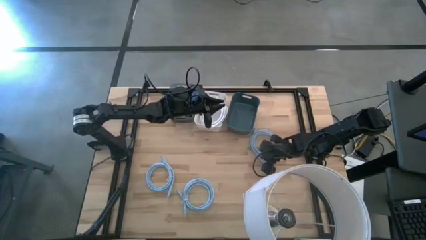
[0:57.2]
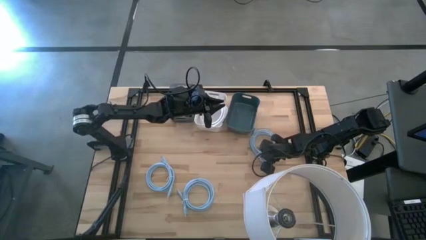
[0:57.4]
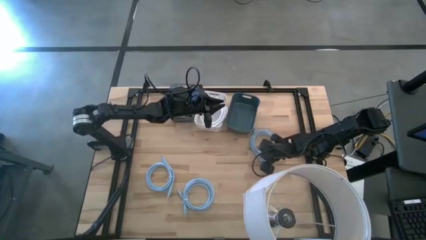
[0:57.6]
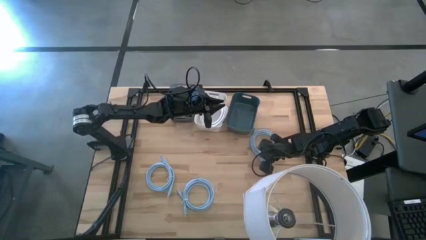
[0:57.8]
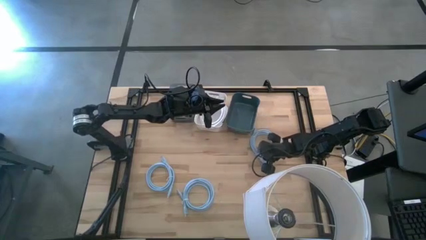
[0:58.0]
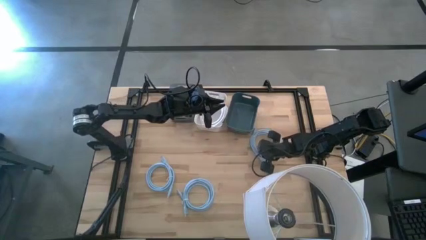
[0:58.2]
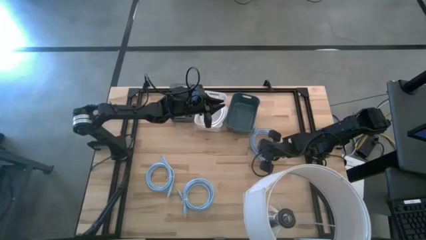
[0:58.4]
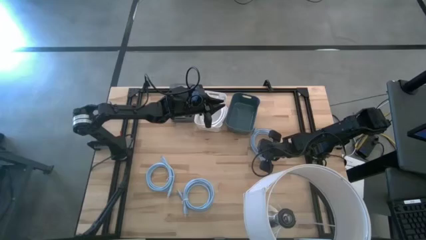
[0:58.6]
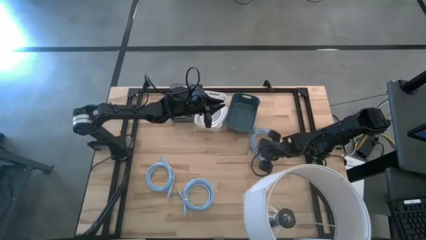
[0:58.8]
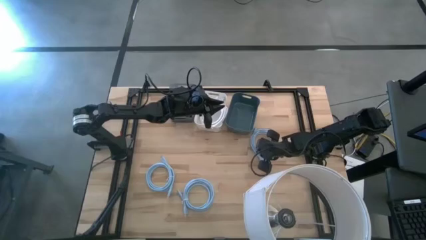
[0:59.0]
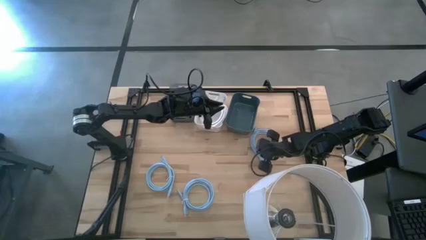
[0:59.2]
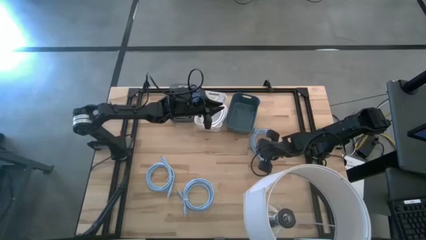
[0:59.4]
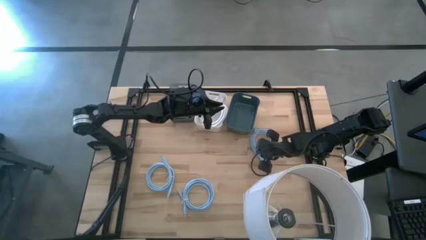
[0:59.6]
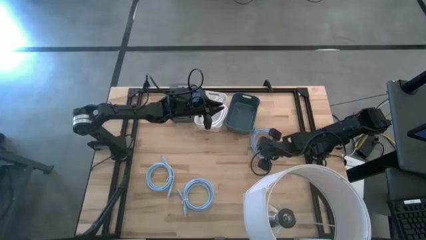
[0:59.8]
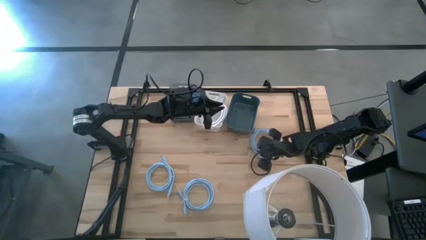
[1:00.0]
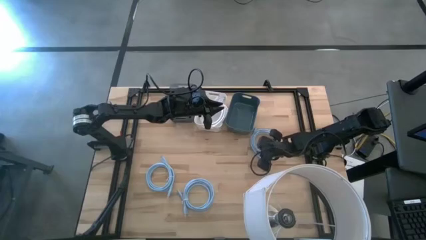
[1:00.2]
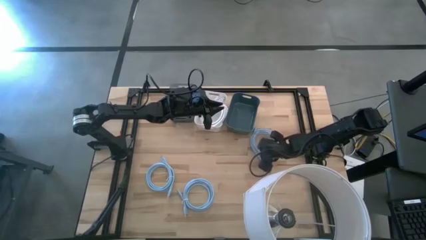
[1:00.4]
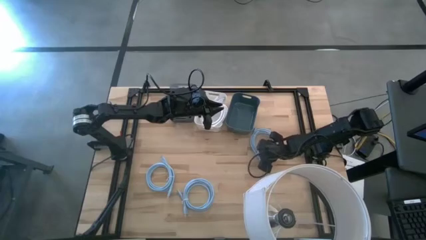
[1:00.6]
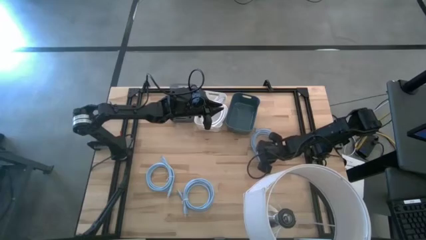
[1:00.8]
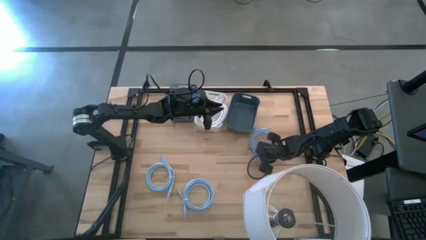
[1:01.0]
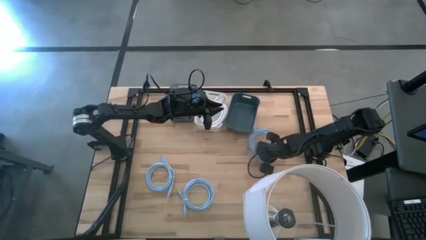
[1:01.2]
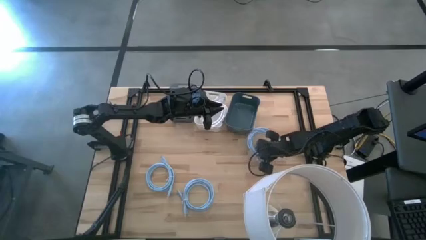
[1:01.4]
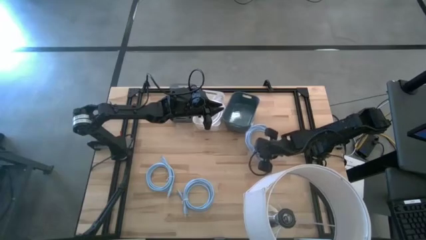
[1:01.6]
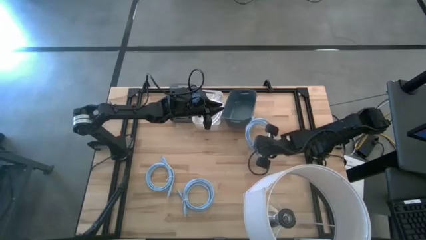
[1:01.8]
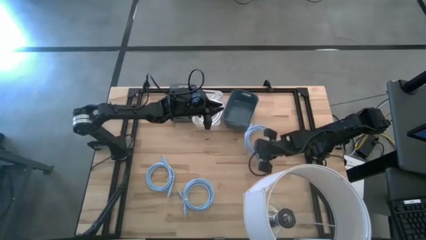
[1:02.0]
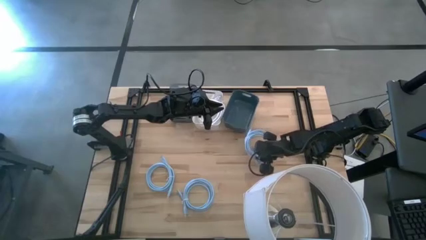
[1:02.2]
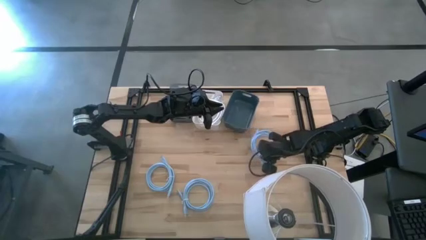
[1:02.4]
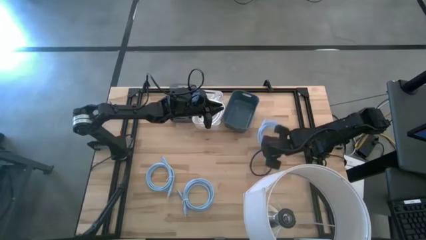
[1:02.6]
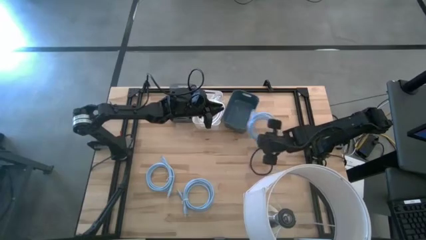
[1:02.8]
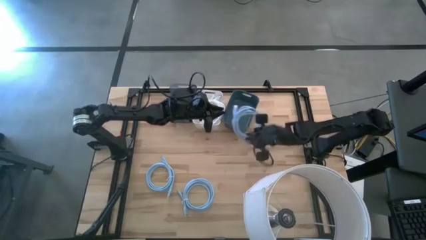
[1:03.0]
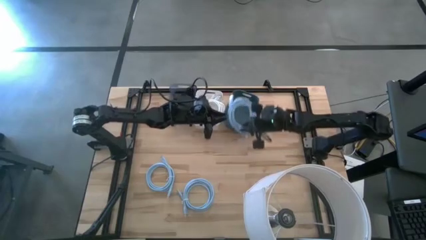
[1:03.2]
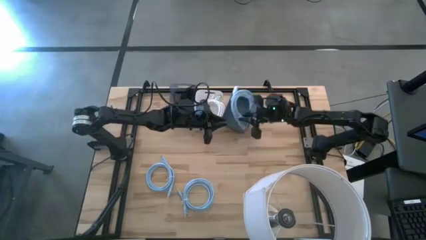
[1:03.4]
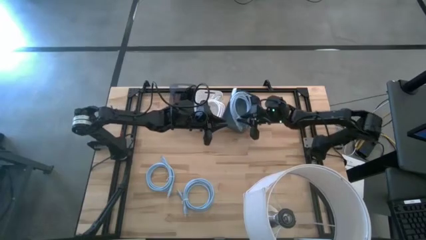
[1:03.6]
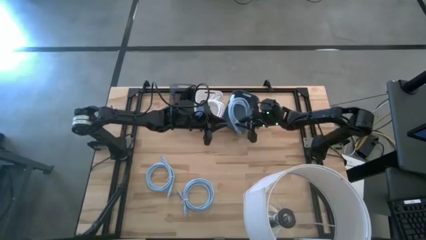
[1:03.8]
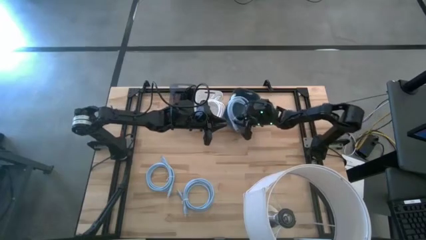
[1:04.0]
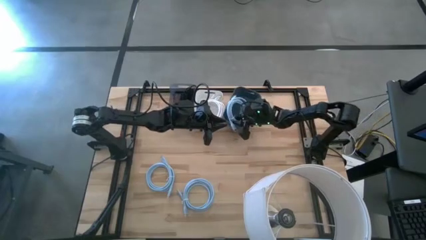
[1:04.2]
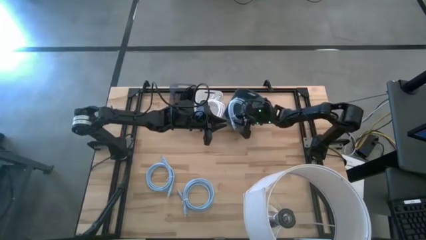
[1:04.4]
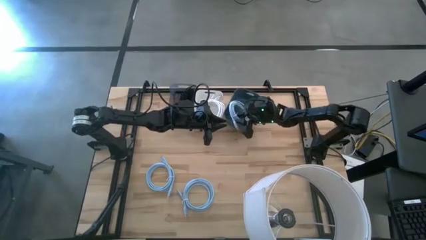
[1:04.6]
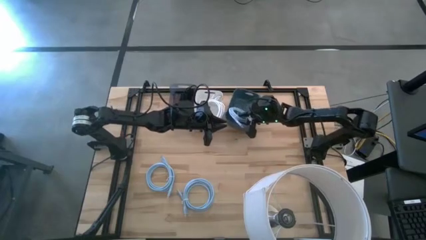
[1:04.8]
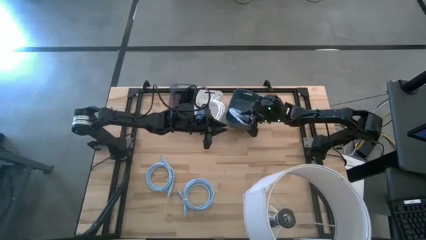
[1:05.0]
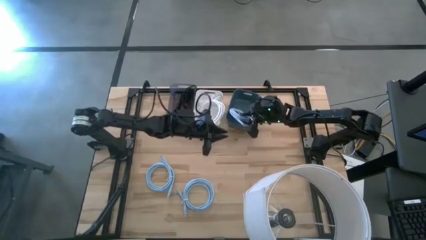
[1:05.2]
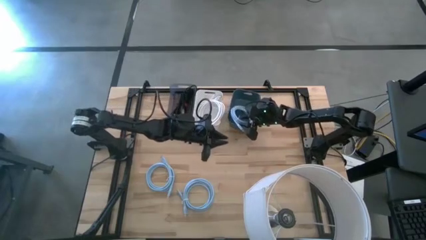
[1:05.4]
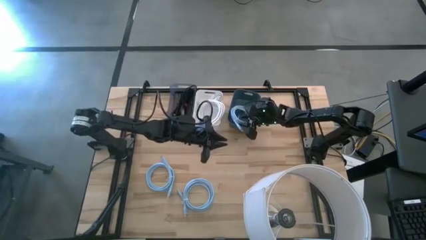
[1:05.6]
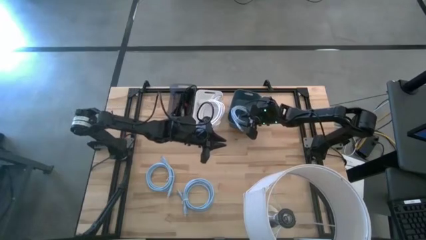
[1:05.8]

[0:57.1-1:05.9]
Task: Pick & Place USB Port
Put the top blue HDMI cable into the blue bin

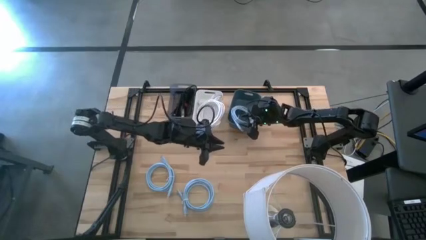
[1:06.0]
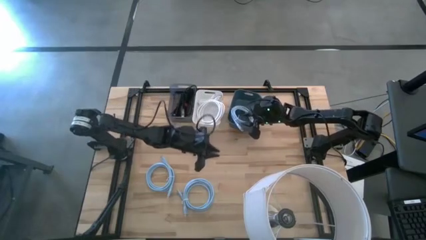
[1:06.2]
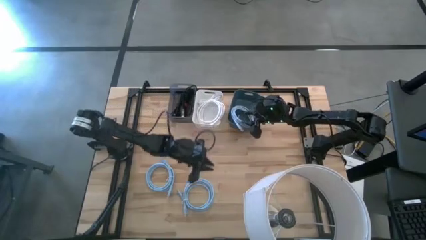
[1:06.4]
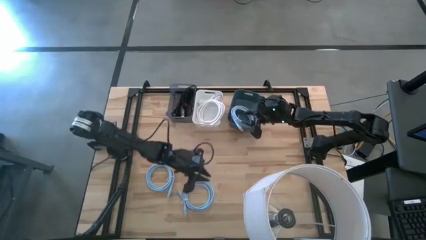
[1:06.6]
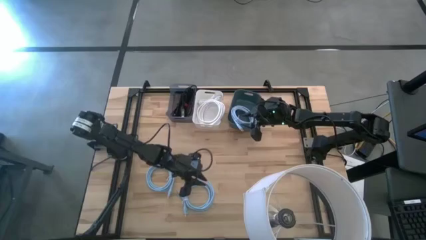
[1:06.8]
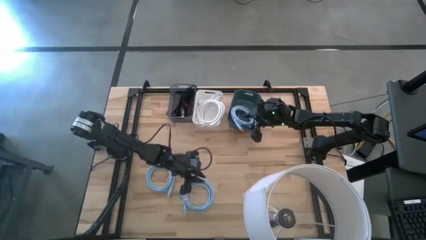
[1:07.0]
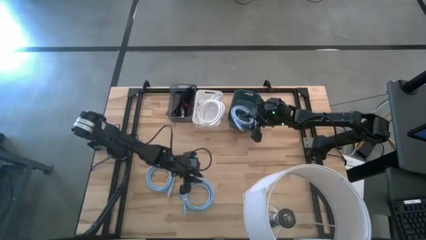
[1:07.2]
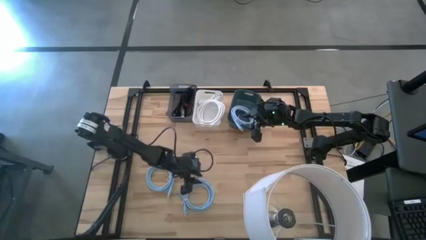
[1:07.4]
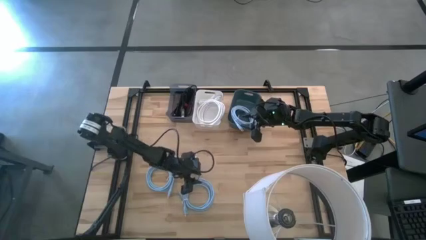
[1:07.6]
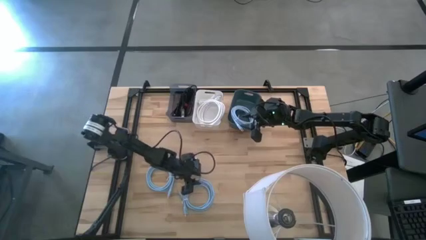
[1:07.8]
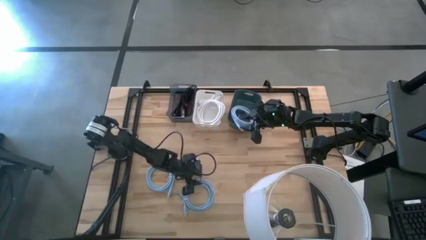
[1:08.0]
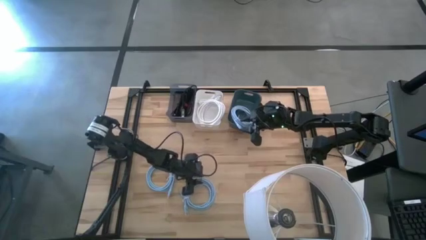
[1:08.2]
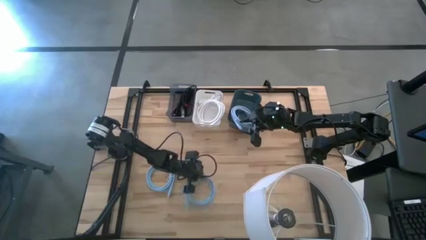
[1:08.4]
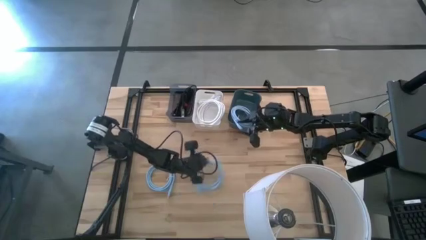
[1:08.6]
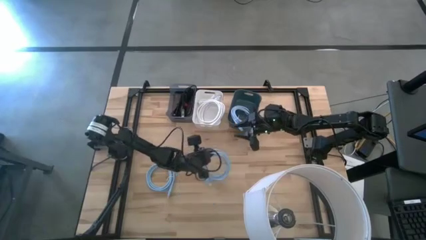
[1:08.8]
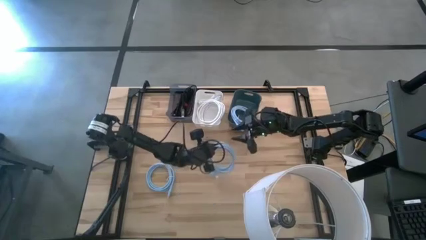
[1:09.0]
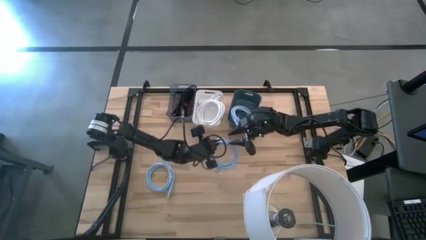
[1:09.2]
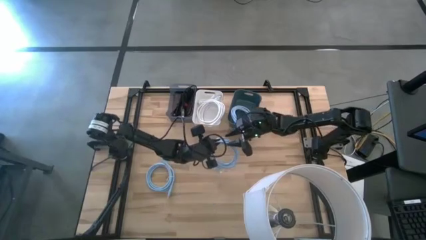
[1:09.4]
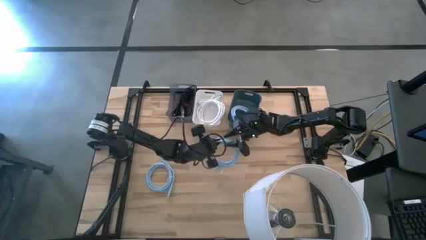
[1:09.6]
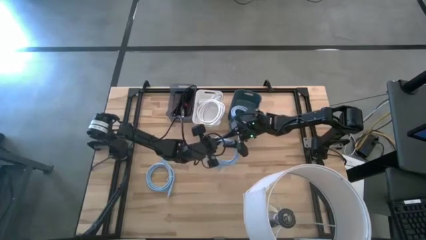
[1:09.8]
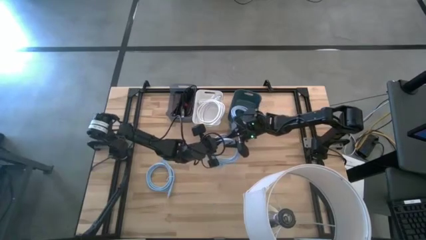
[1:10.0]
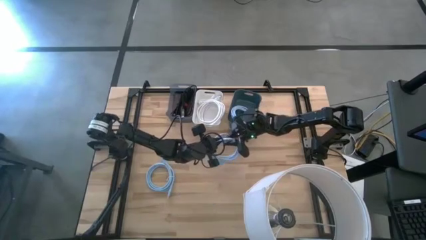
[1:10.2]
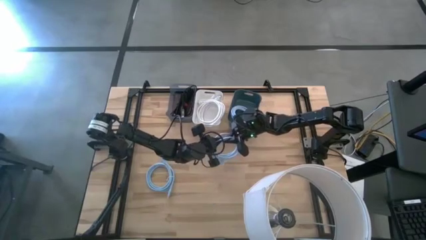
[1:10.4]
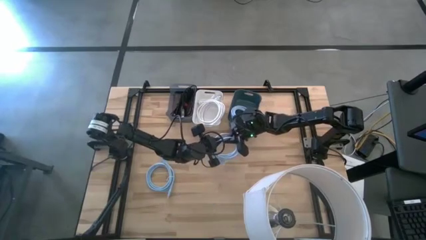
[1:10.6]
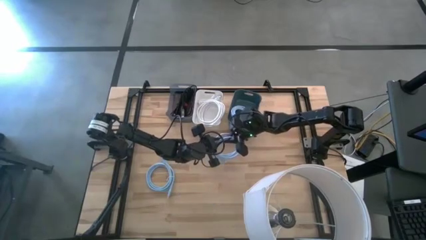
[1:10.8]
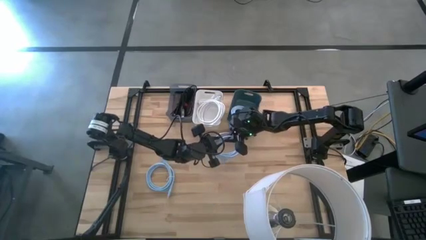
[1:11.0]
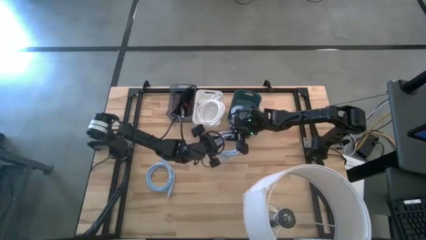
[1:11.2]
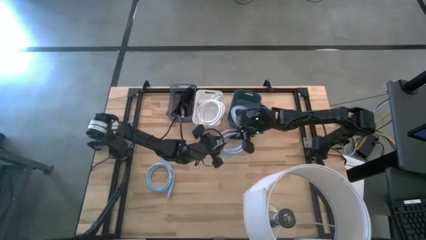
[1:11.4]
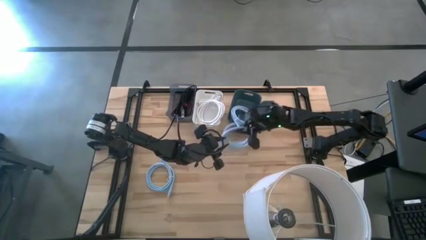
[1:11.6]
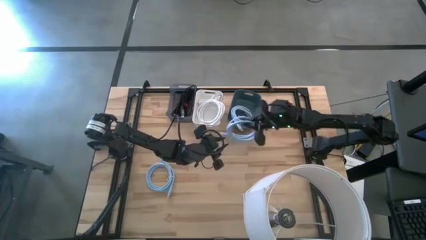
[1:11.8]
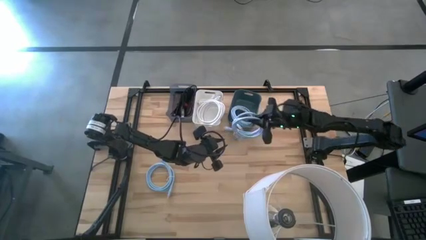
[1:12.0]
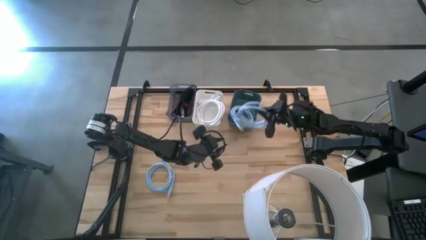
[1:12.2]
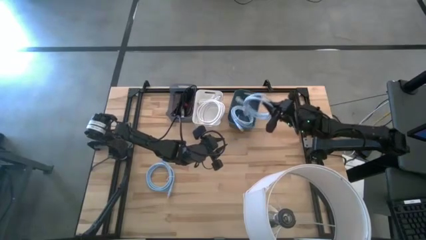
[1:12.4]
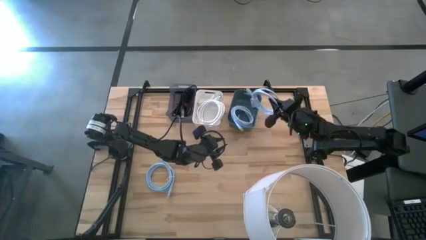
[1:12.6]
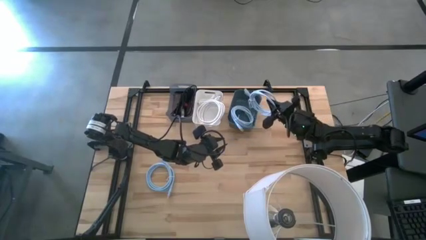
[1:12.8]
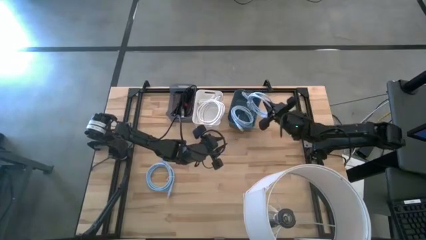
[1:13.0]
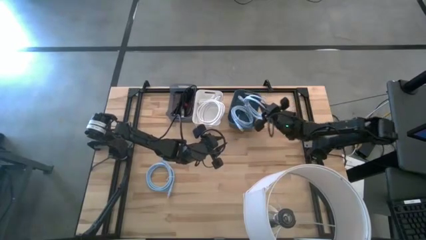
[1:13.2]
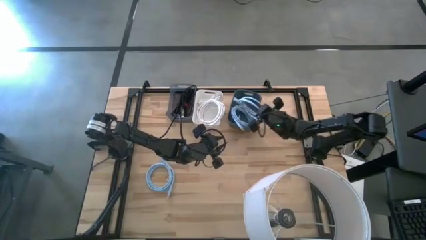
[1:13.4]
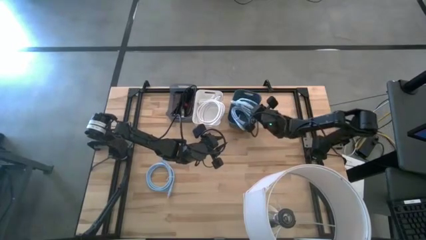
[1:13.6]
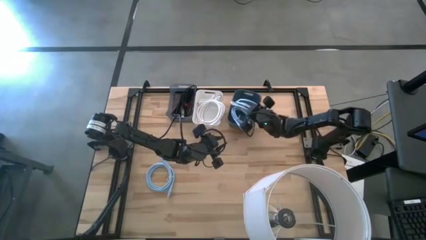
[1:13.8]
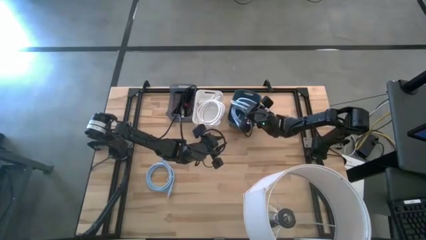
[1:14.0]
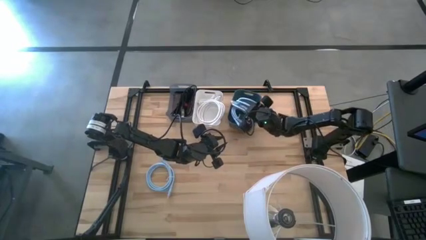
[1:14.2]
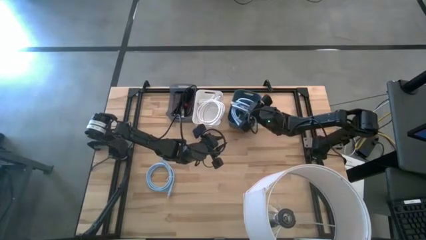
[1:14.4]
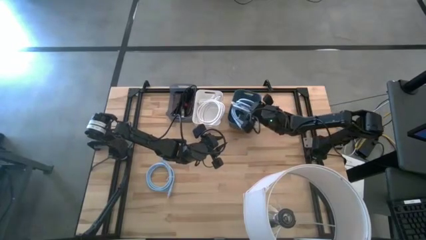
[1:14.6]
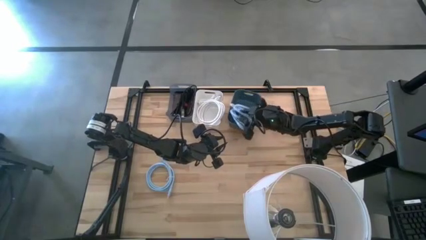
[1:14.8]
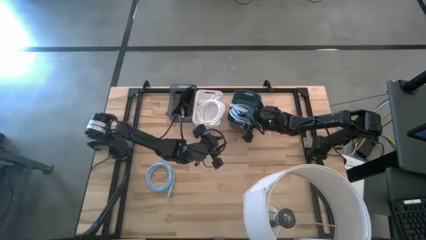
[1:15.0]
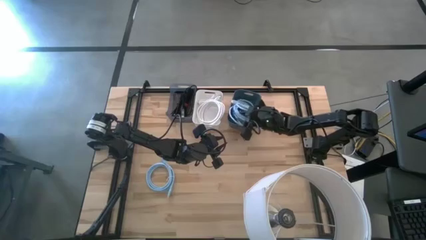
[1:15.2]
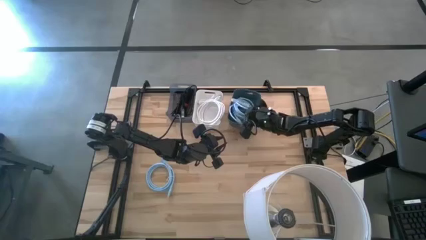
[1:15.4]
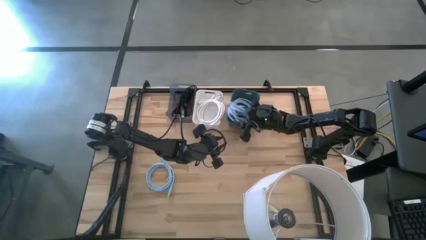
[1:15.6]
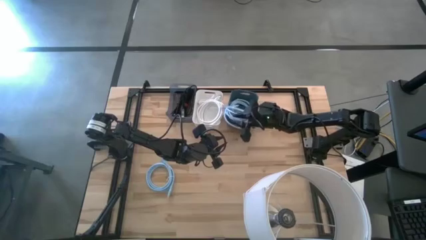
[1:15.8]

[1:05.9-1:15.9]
Put the right HDMI cable into the blue bin
